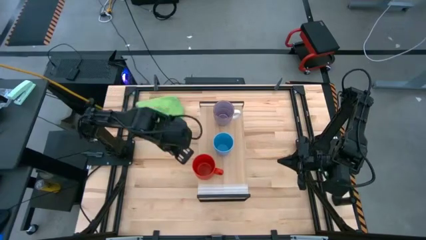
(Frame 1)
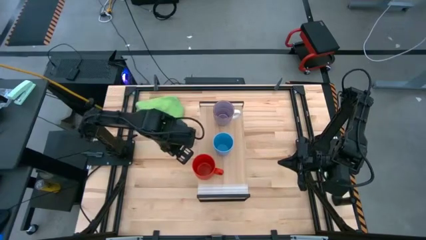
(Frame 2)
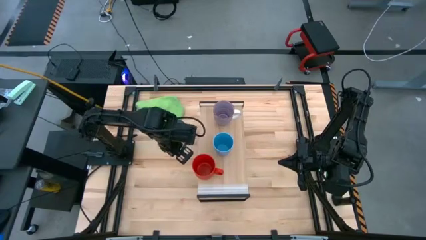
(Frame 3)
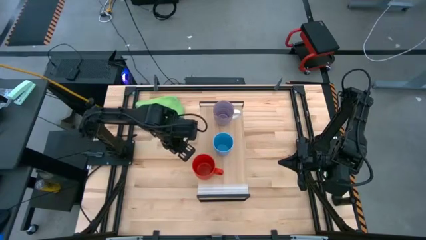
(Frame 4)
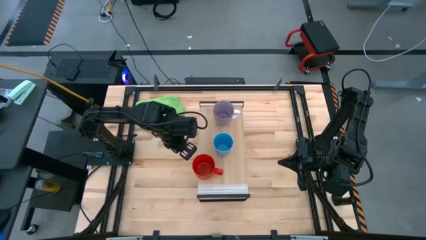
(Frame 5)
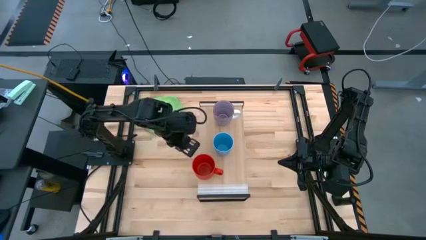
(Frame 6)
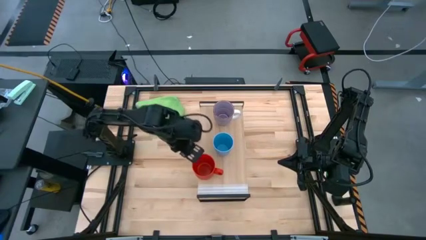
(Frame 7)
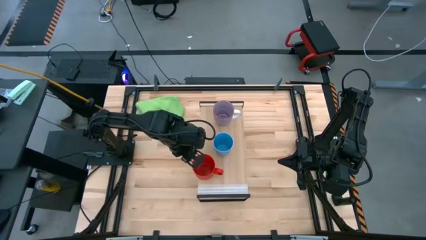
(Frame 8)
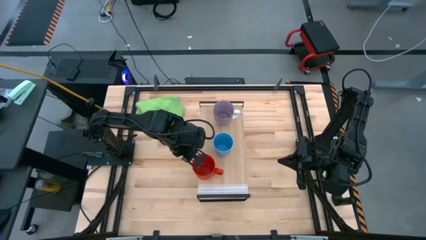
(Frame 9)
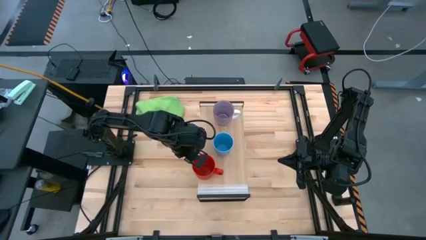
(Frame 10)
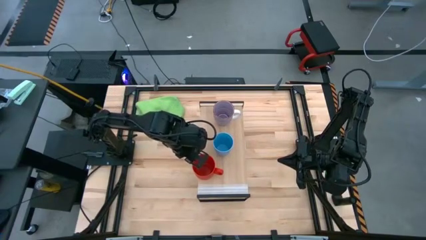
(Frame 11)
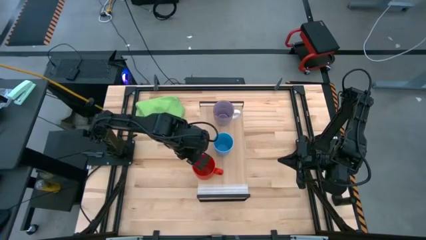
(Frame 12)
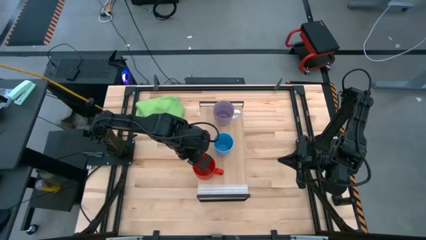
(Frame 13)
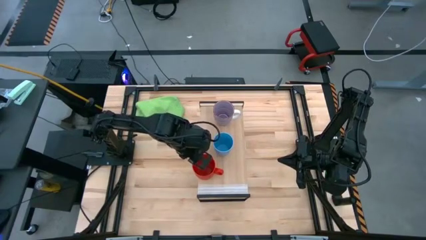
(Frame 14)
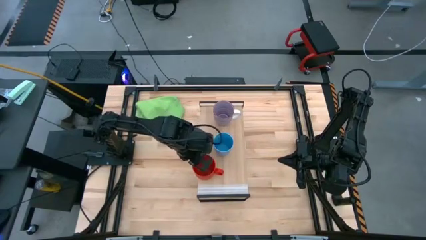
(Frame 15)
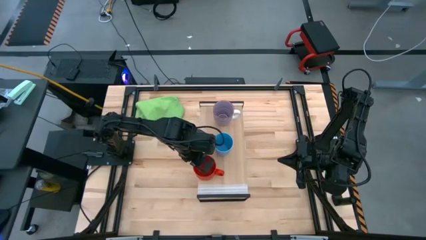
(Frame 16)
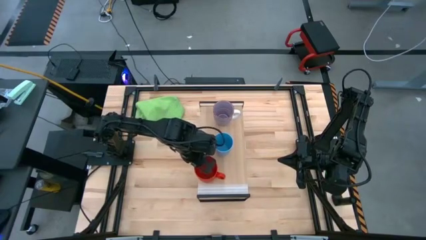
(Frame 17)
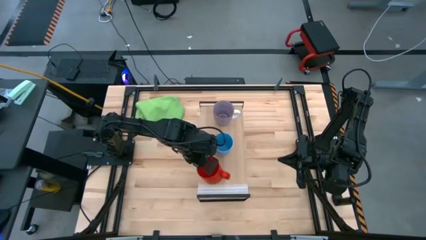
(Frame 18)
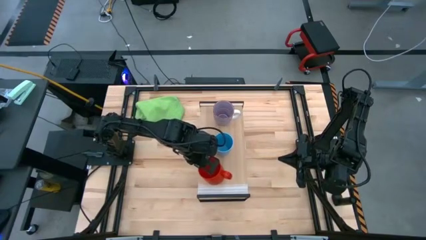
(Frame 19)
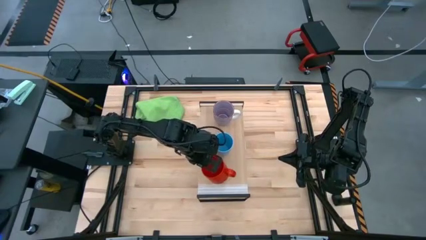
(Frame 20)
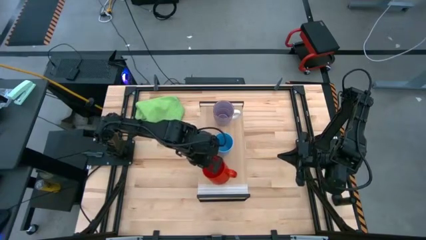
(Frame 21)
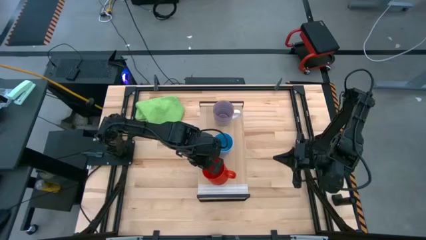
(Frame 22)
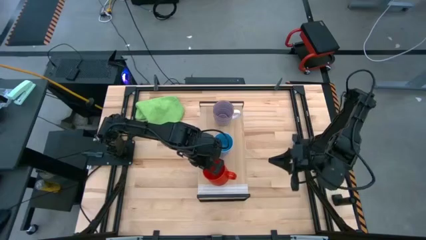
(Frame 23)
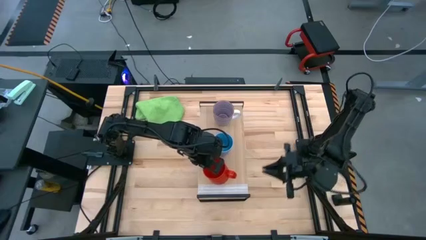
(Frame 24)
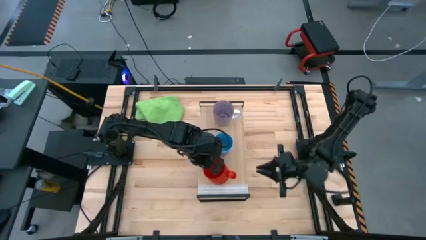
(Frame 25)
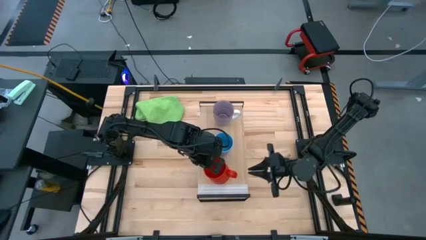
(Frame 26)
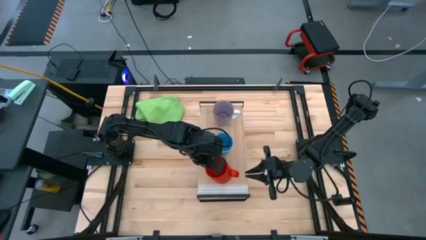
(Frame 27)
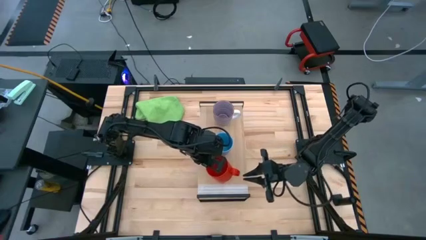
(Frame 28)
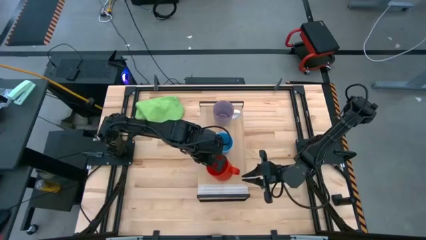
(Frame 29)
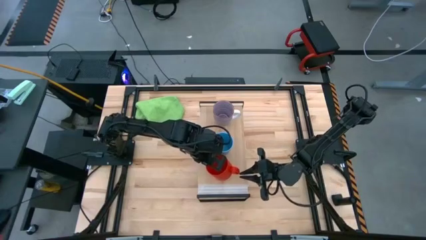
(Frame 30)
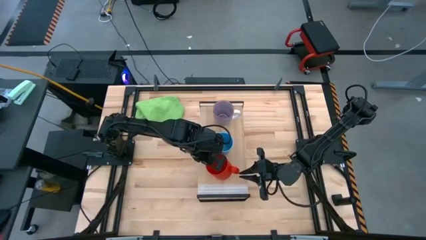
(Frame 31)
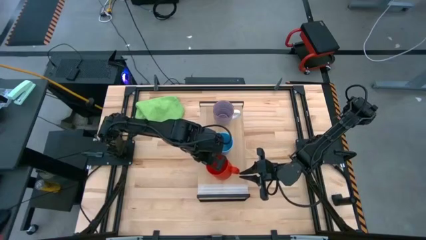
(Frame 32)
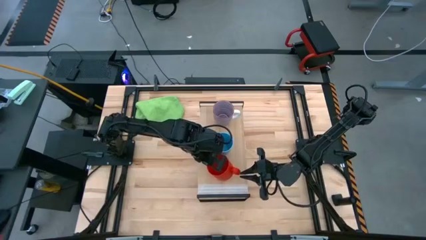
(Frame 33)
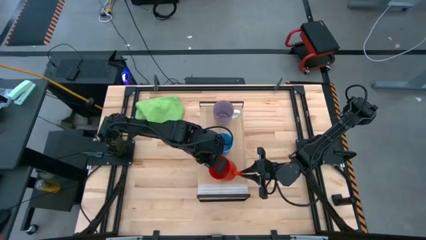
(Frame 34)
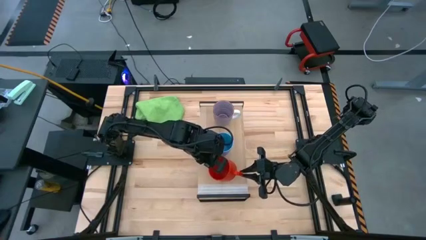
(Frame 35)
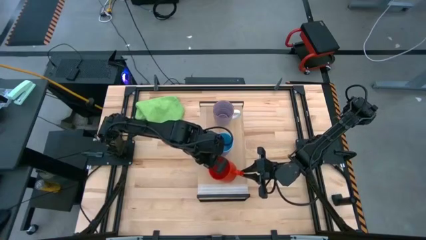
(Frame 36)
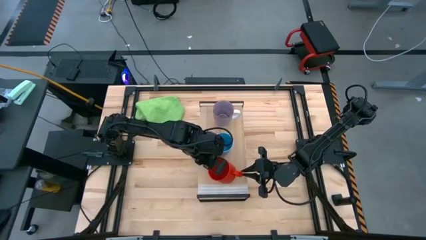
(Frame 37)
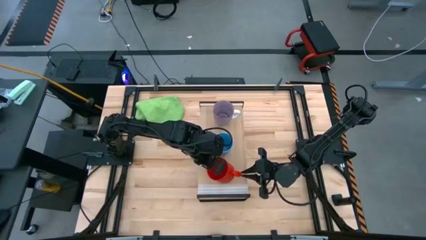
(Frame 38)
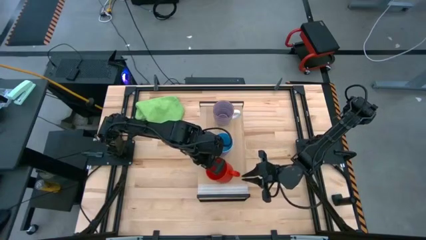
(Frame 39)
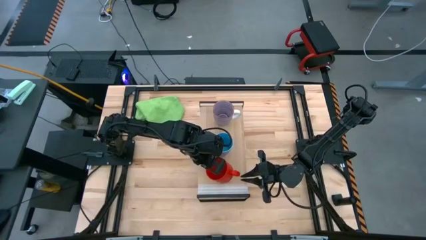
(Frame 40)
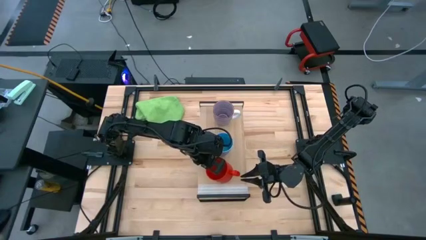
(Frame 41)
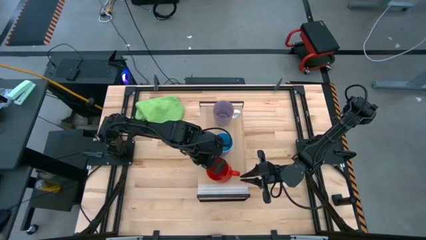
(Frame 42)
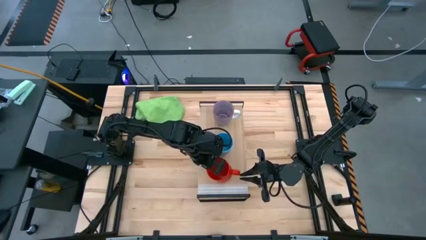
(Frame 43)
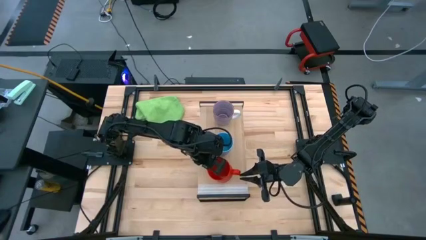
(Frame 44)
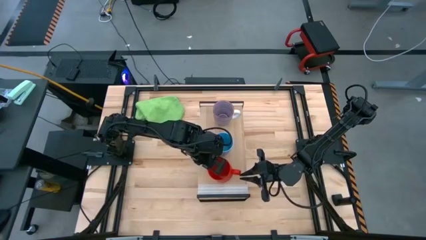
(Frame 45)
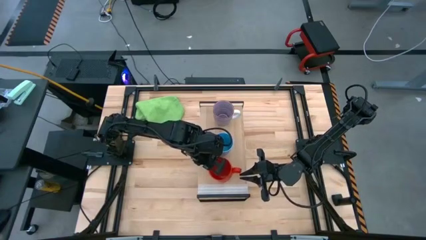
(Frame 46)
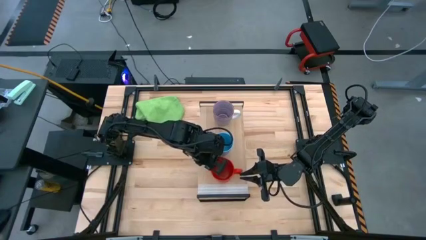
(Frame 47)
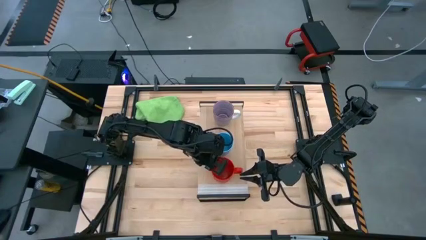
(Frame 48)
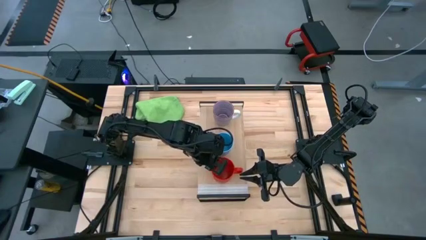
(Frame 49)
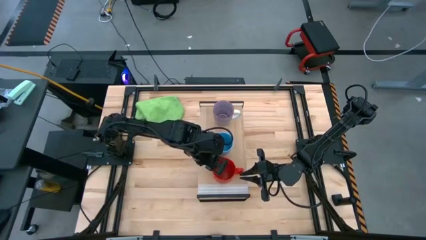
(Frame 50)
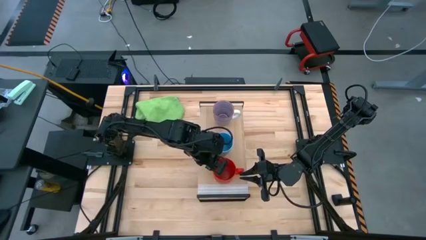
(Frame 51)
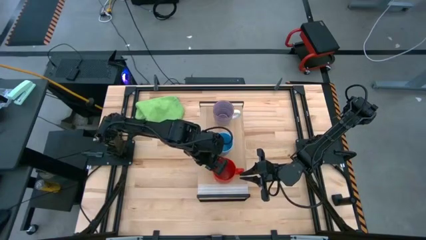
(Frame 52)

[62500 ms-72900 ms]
Task: Stack small to large cups/mugs on shelf
Put the orange mug on the shelf
